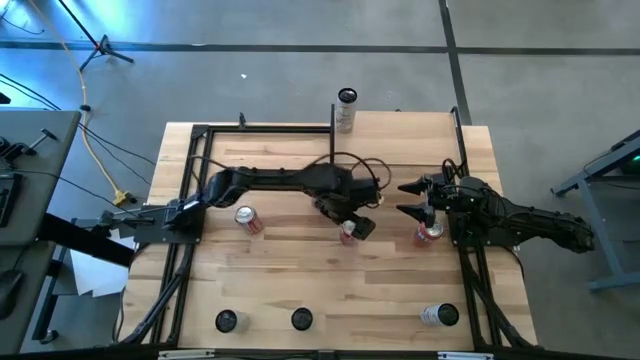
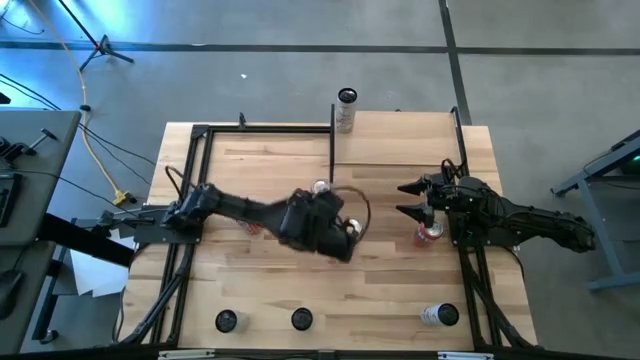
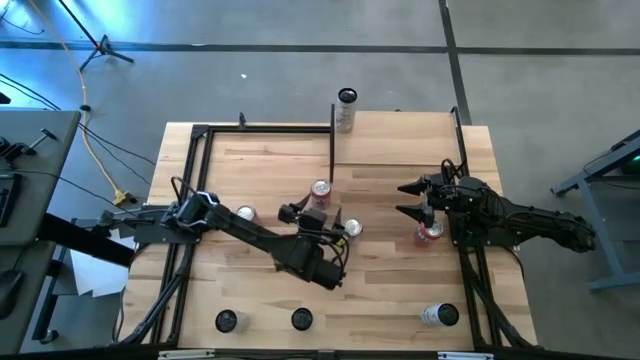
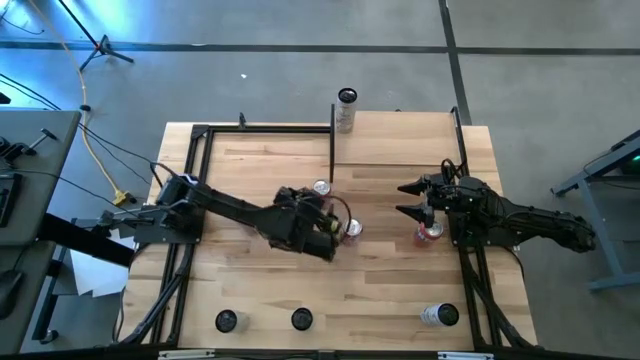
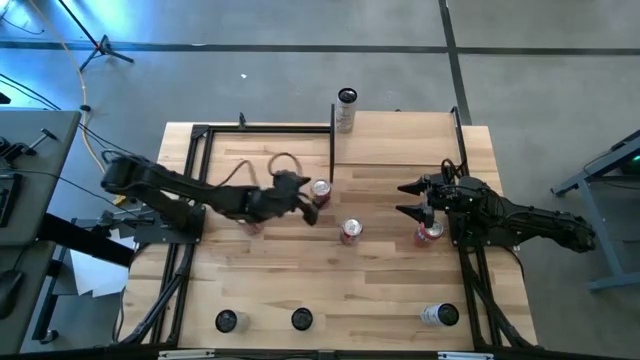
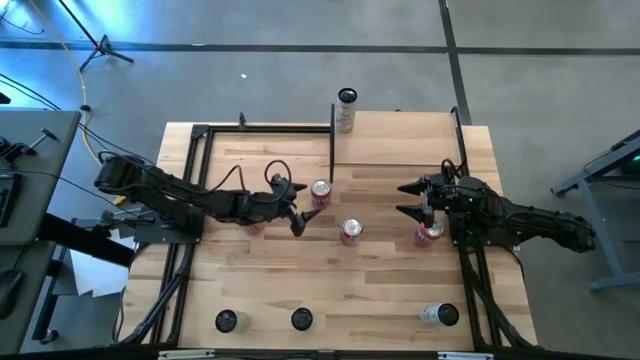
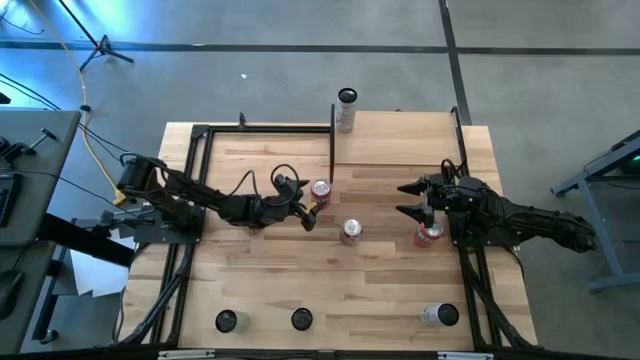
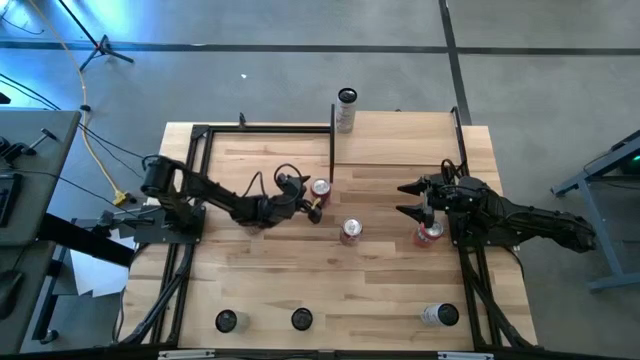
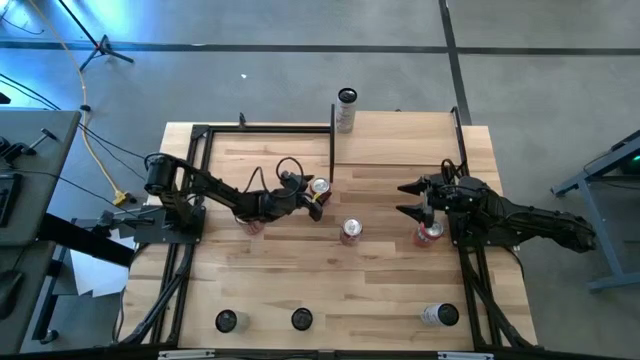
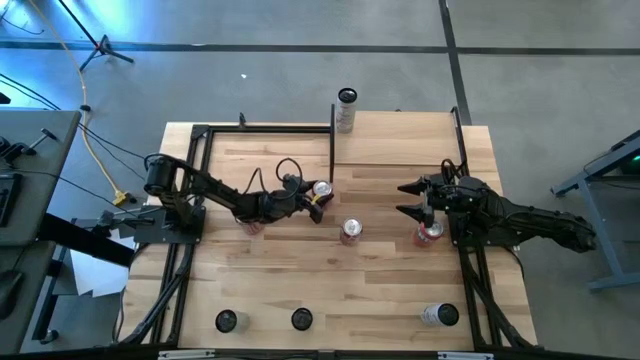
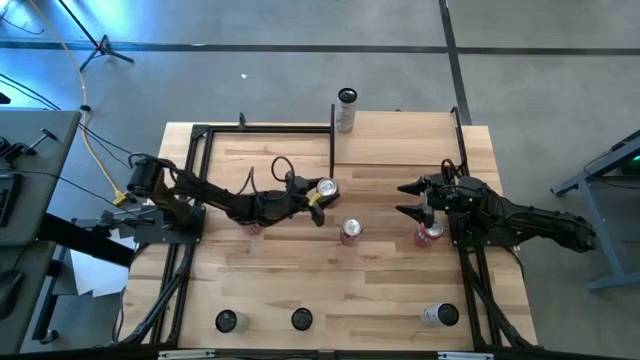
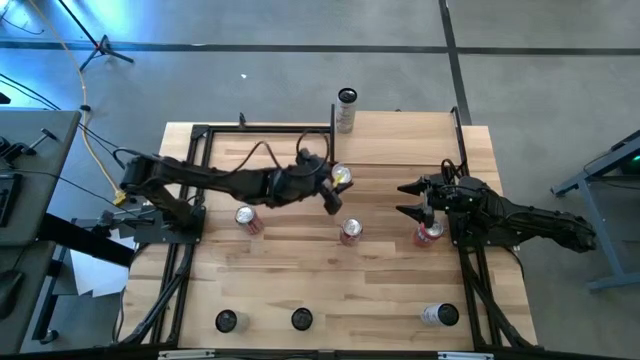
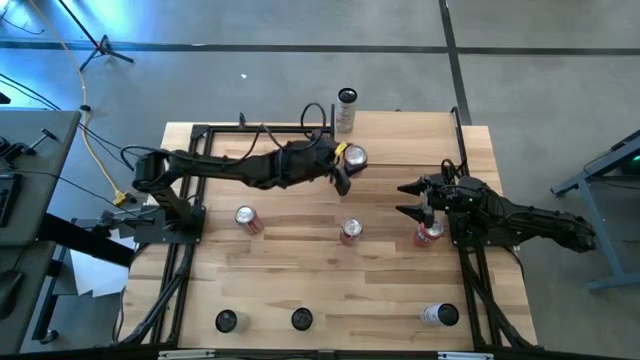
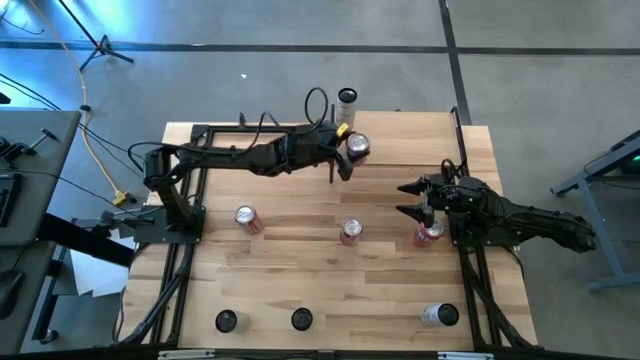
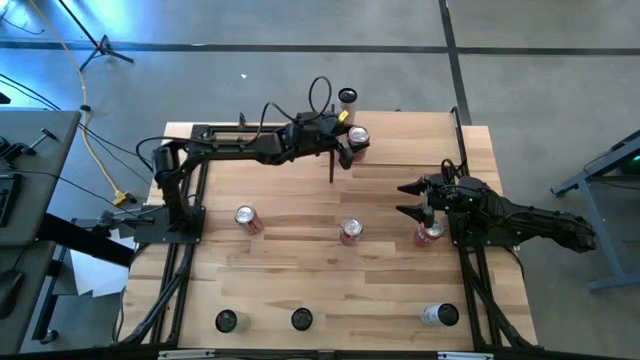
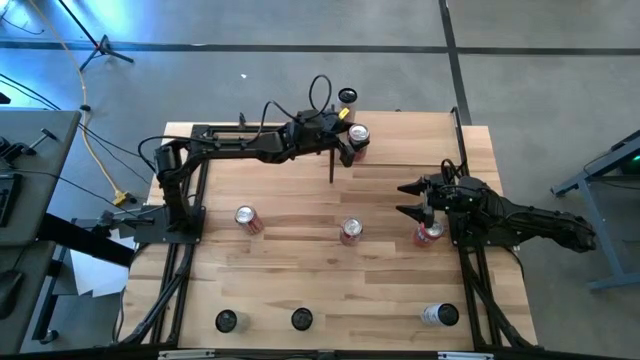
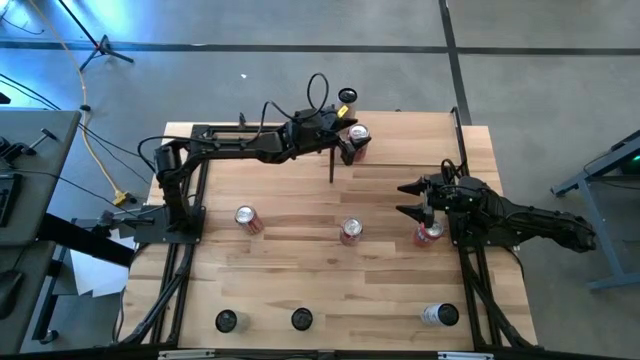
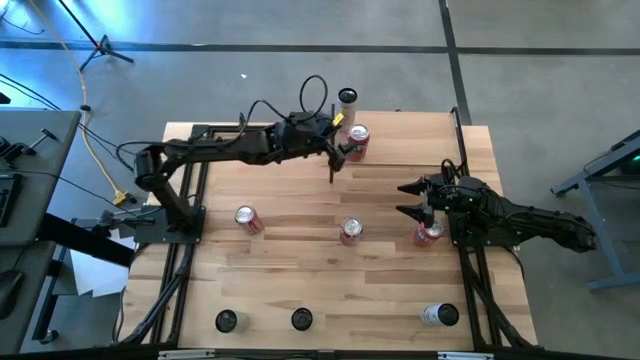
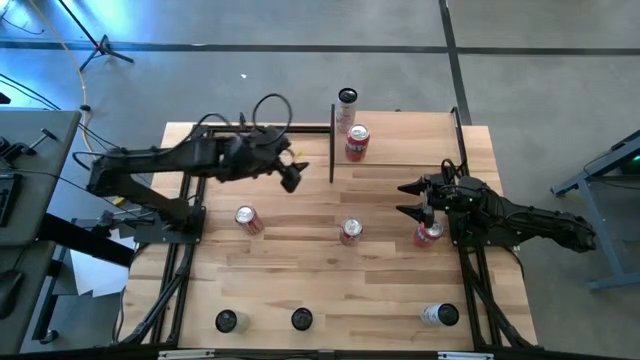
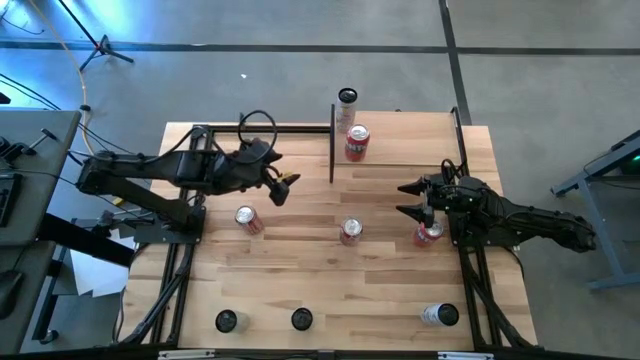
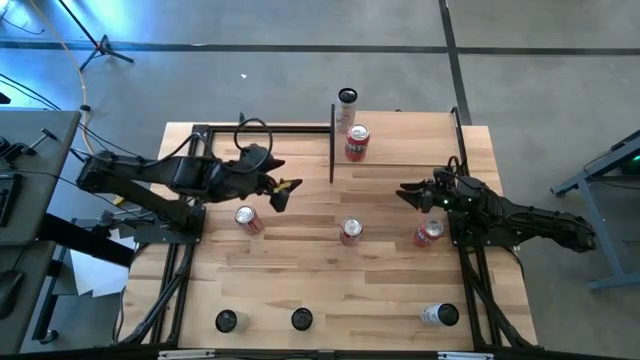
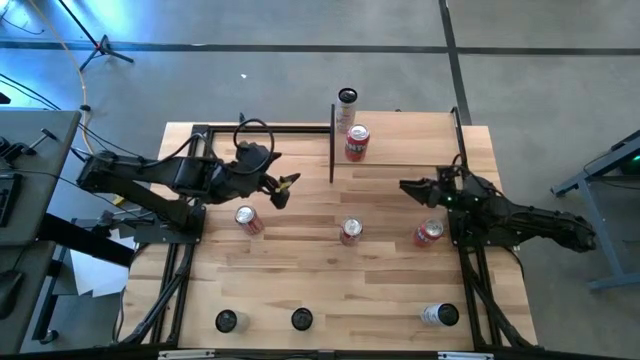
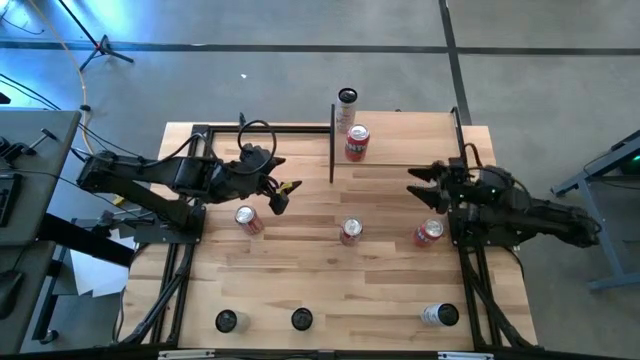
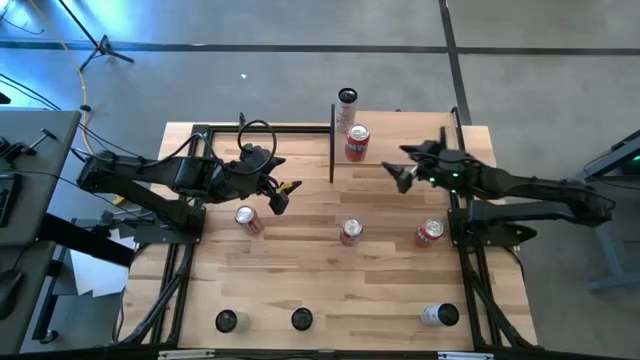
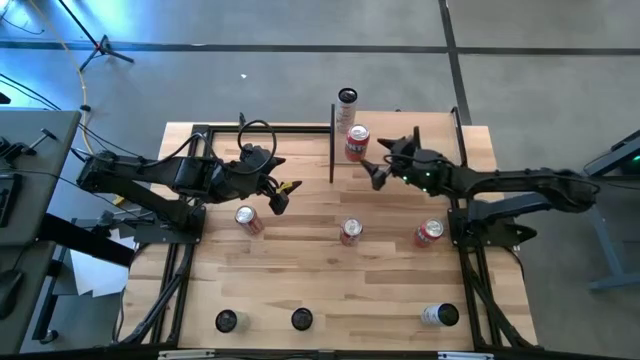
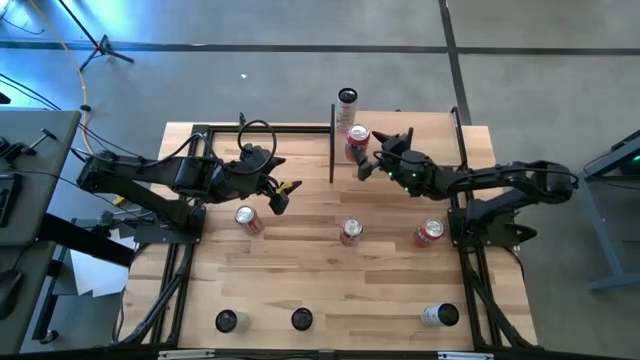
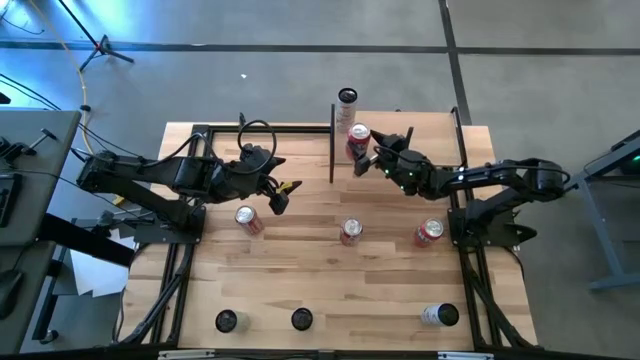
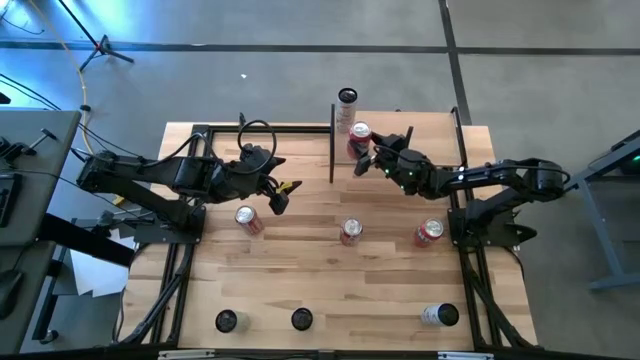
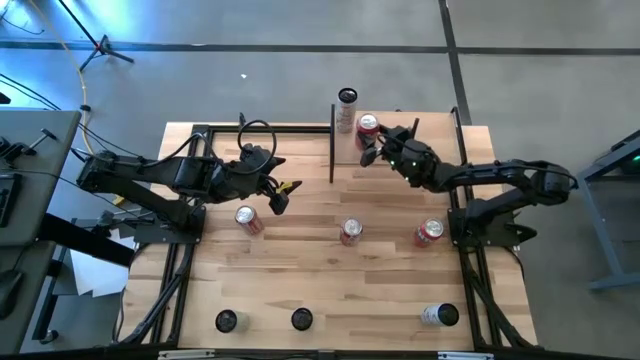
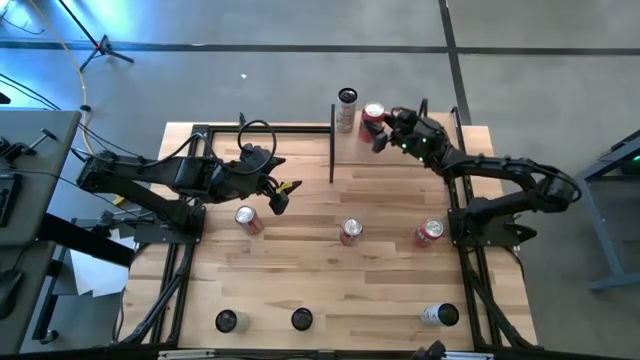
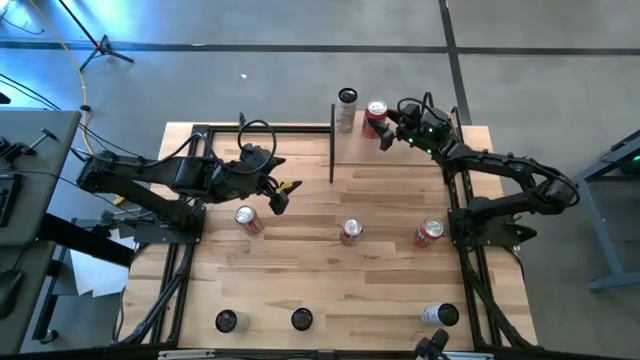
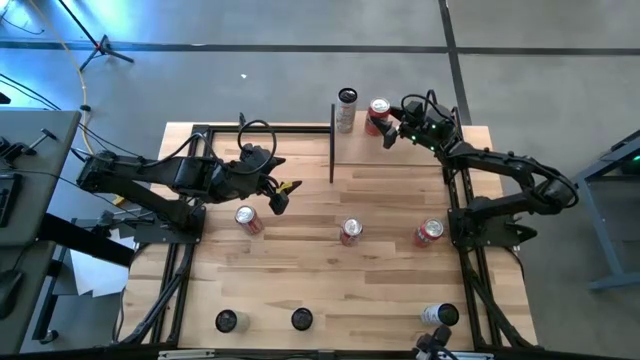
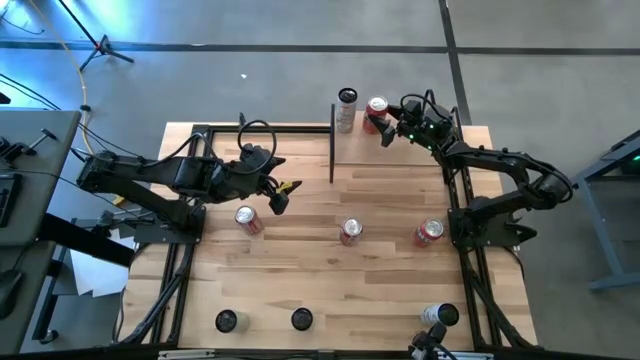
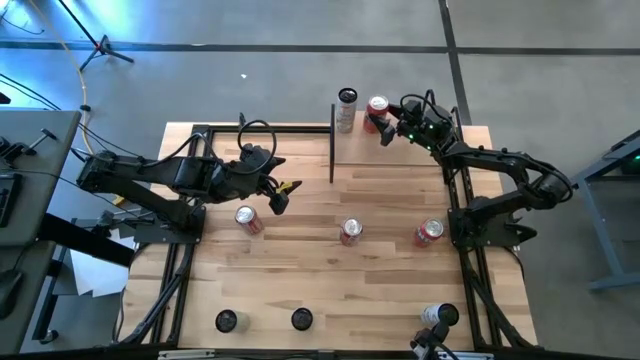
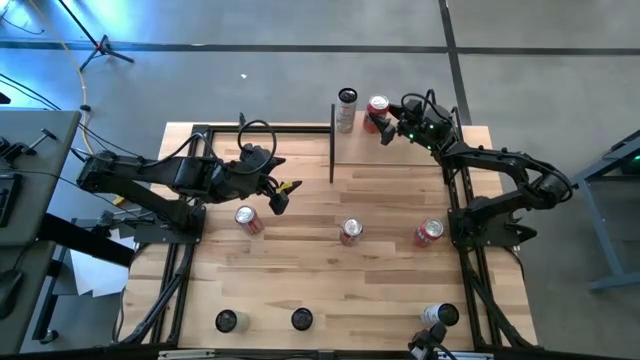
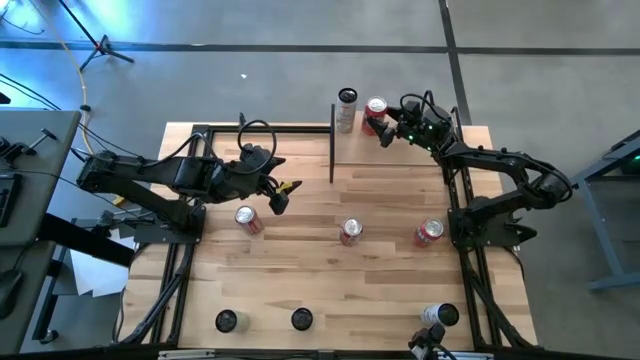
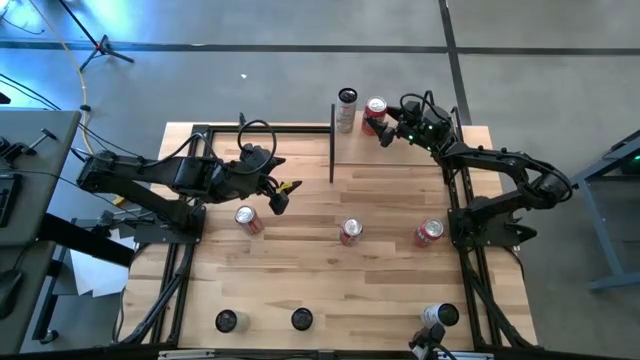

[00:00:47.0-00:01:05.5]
Task: Place canned beverage on shelf
Put the left red soda can on the shelf

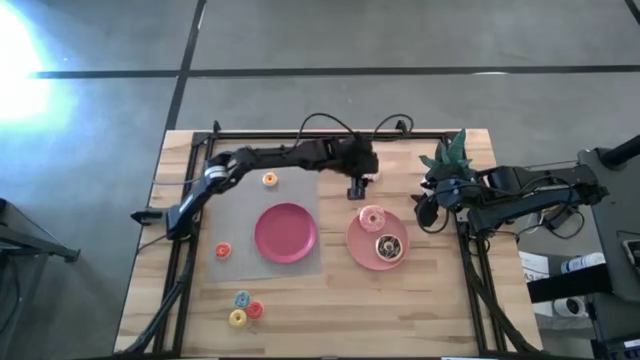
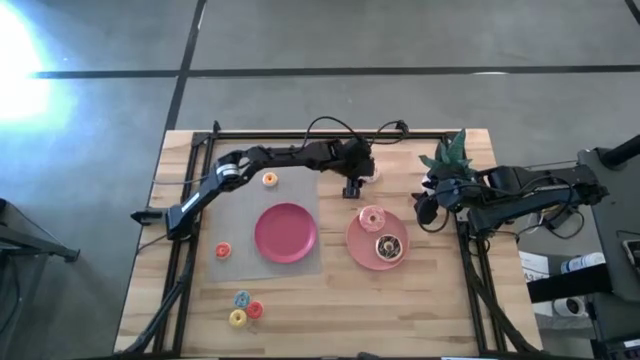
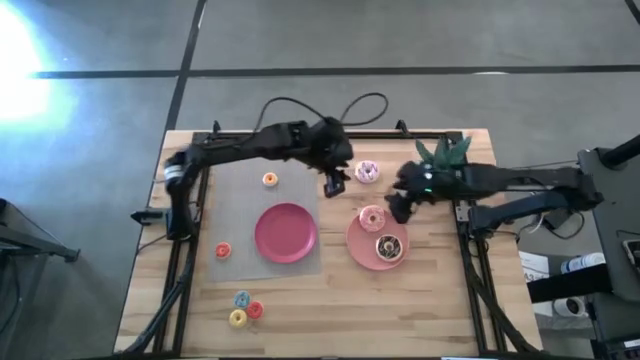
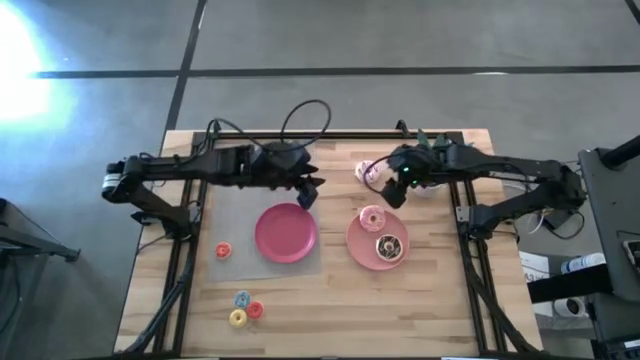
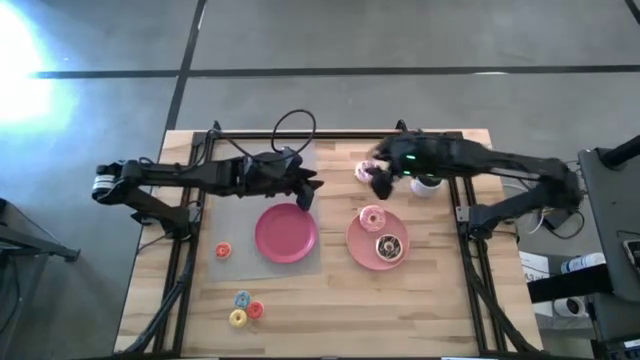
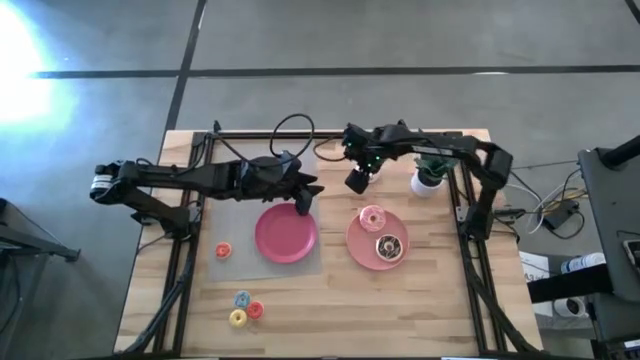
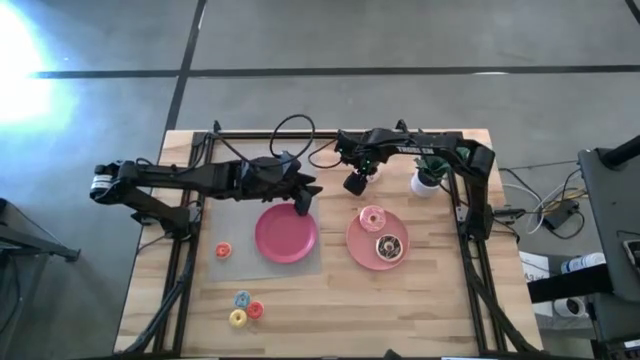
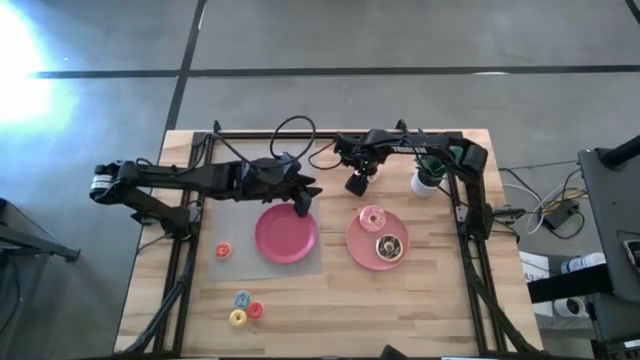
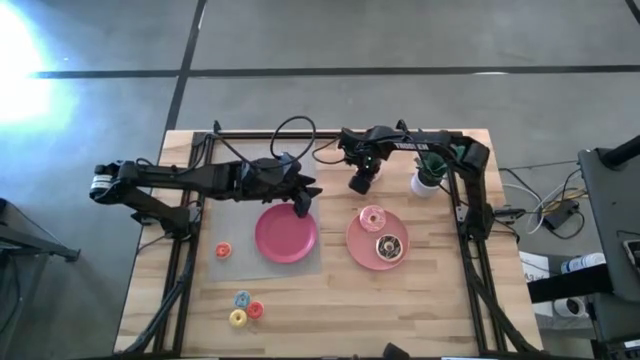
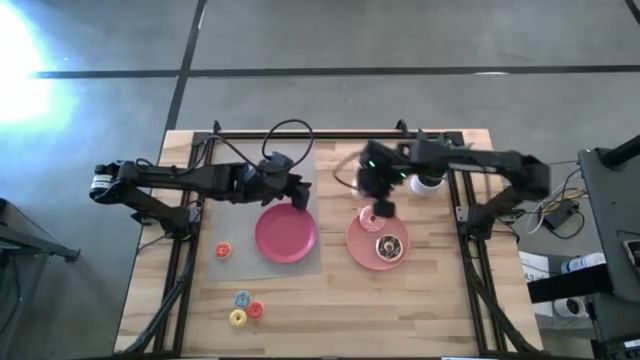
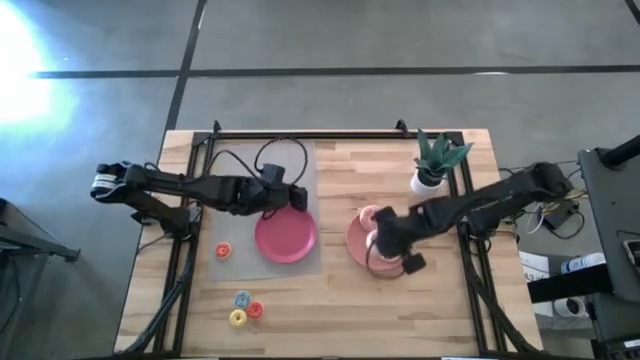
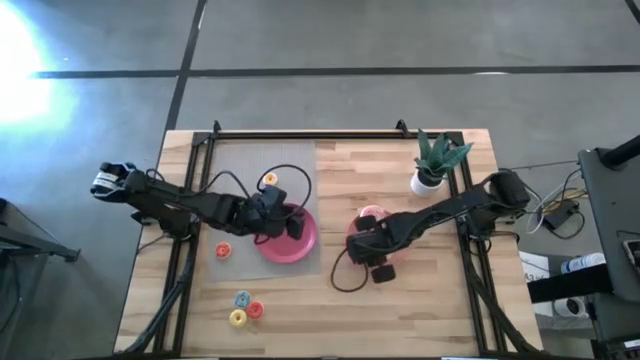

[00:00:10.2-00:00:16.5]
Task: Pick & Place donuts
Put the large violet donut on the light pink plate
